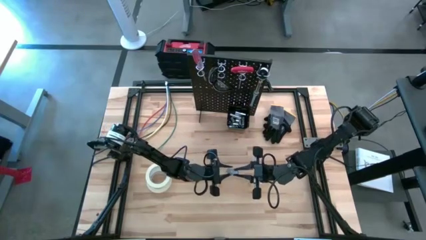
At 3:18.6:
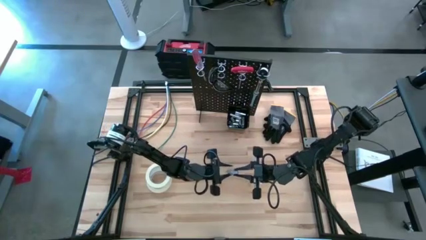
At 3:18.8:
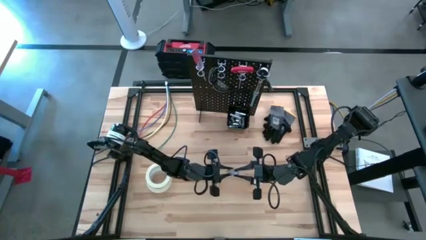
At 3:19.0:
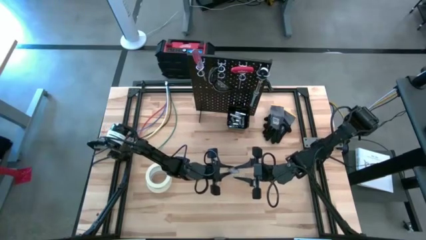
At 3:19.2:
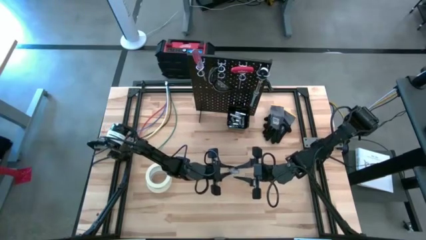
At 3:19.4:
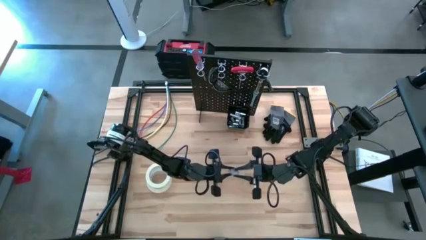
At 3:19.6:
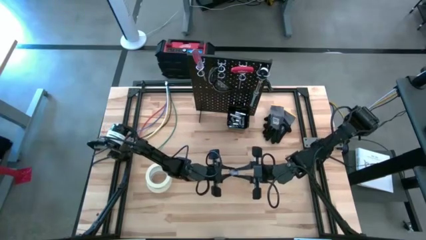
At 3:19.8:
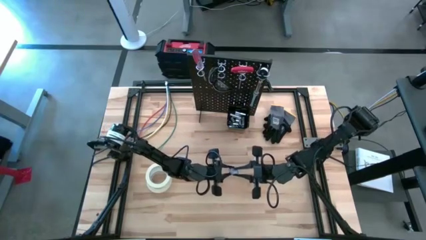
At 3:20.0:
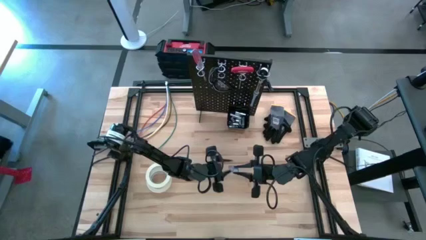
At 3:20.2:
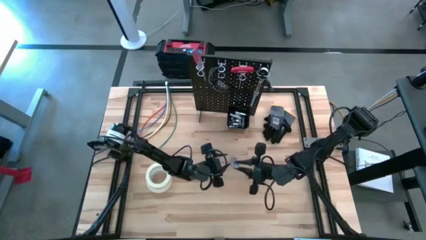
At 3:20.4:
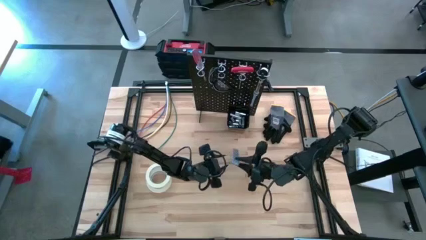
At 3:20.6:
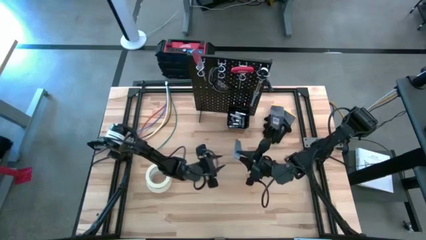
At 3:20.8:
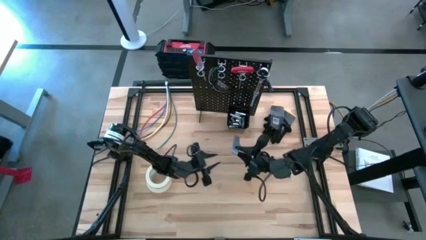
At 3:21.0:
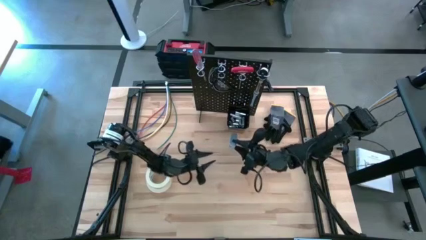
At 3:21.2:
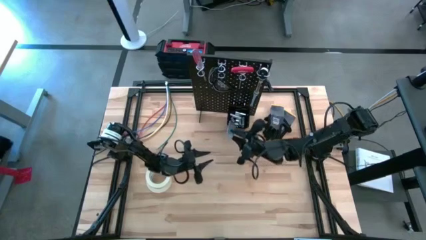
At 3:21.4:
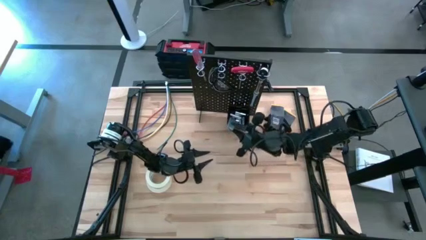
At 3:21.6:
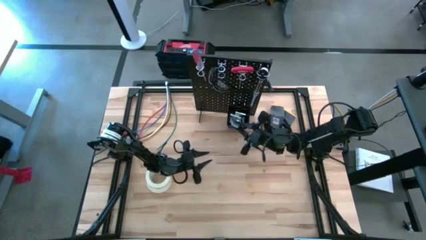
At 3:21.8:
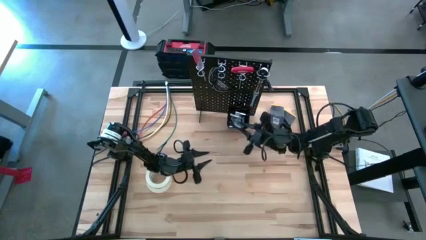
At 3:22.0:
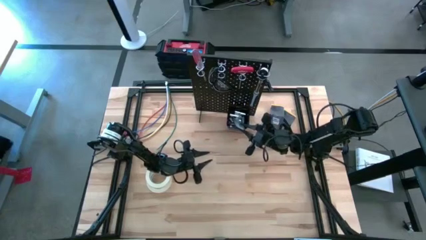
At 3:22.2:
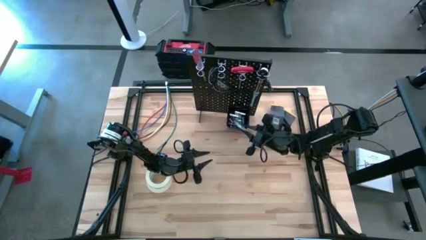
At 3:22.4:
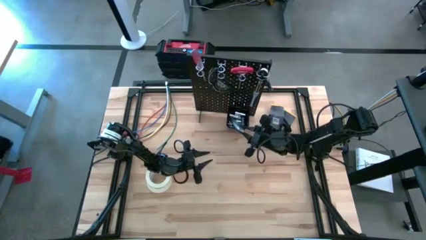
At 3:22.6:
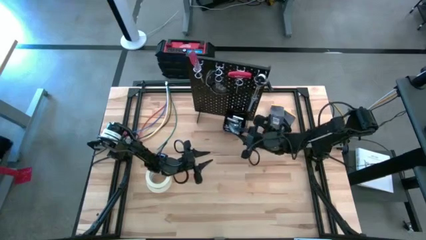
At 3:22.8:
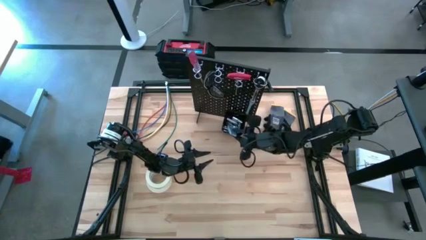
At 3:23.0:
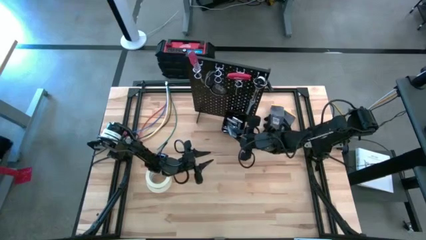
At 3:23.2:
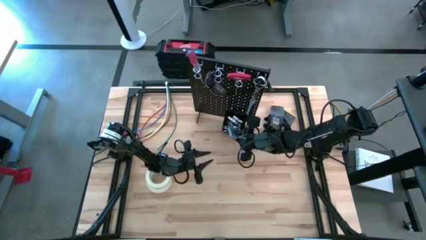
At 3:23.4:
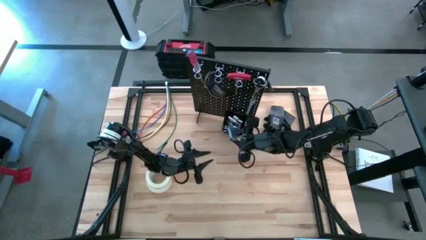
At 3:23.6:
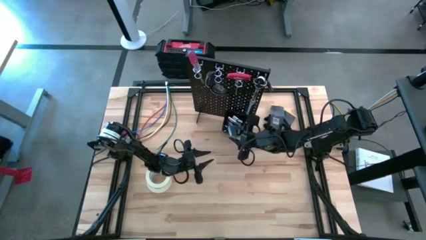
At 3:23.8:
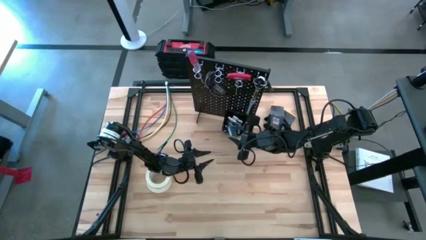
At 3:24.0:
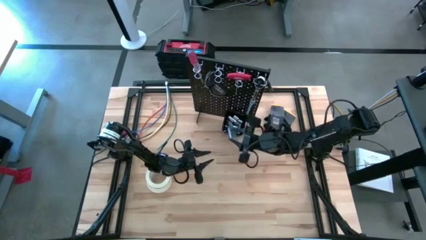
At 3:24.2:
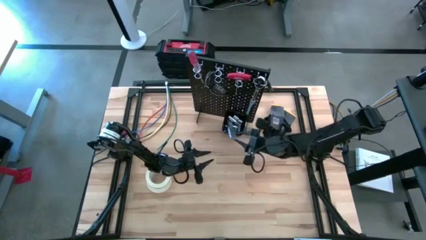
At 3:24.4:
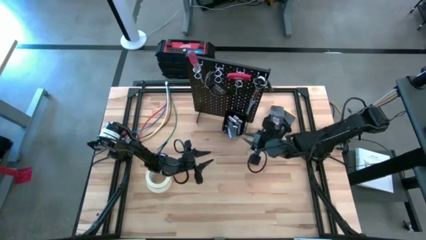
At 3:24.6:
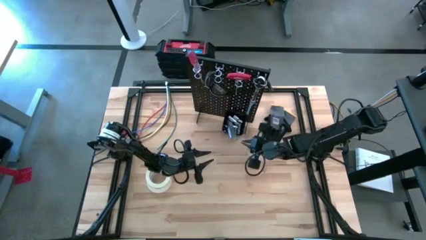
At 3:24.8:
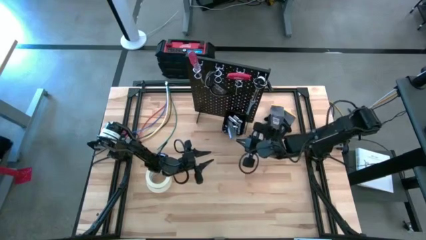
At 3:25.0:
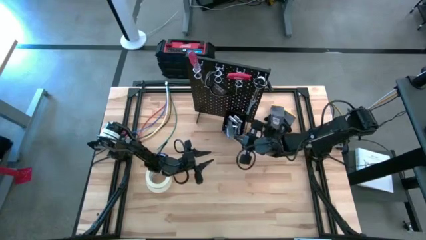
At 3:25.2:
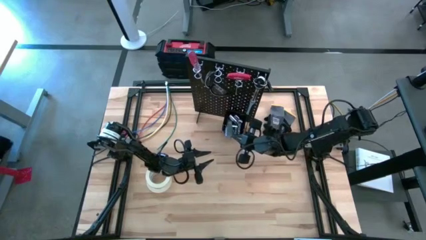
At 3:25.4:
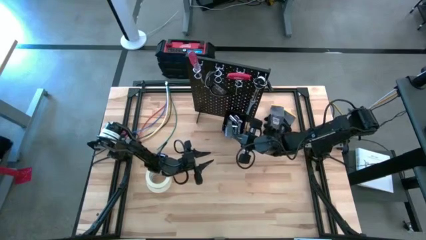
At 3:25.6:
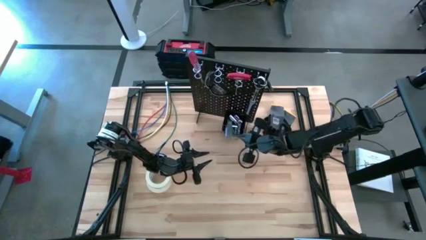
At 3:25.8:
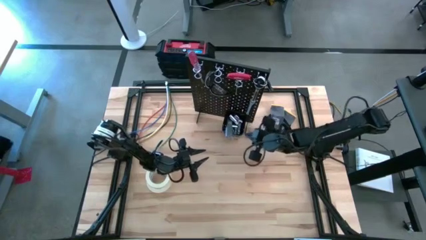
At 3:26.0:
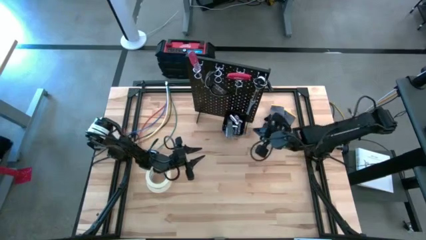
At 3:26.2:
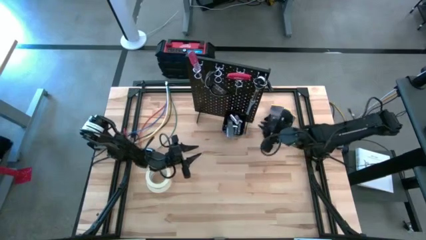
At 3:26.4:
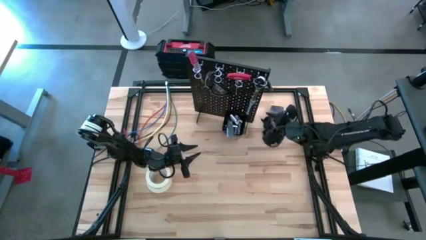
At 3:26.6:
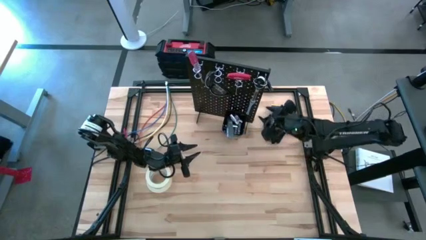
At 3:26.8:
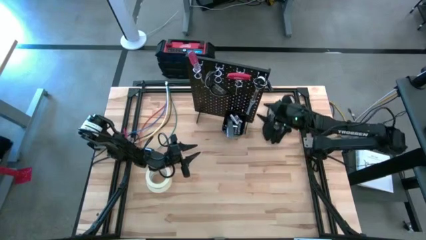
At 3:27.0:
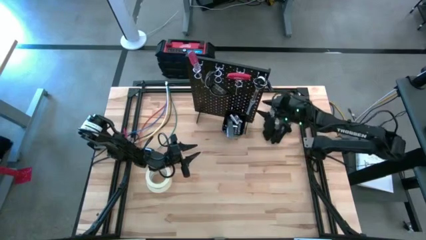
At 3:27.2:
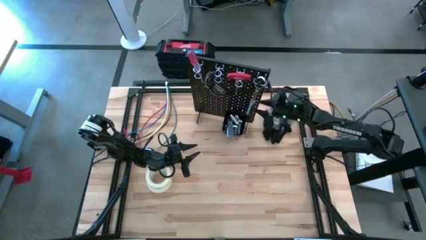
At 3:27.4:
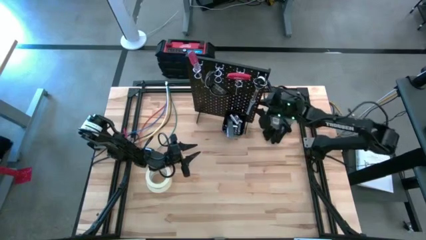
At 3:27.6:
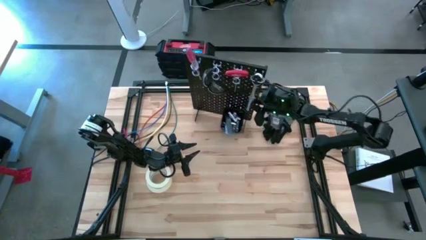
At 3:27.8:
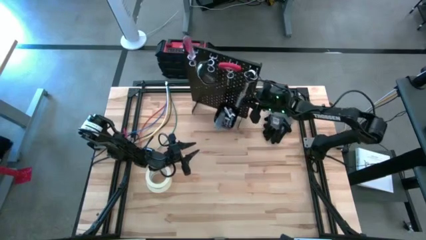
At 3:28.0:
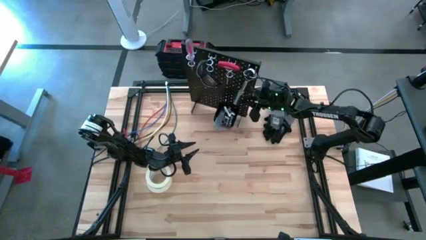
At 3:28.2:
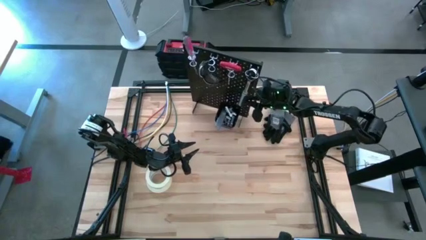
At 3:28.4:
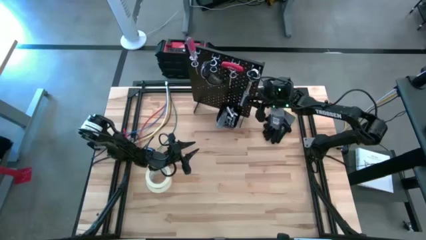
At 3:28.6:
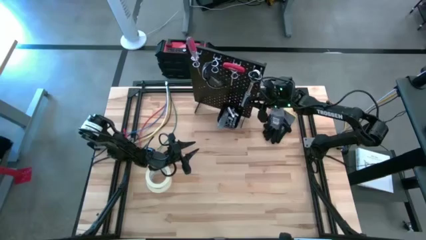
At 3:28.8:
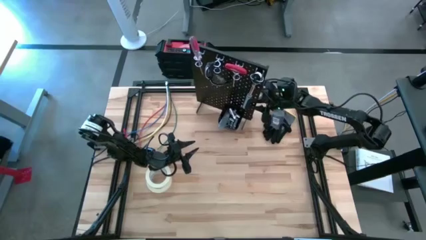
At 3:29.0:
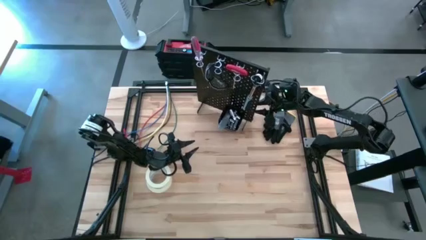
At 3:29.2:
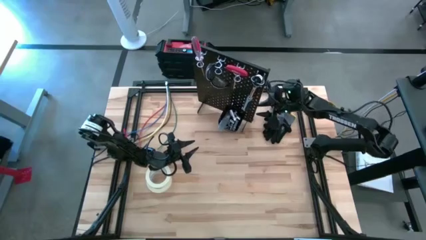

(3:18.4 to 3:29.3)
Task: Hang tools onto peg board
Put the cutter into the black bin on the peg board

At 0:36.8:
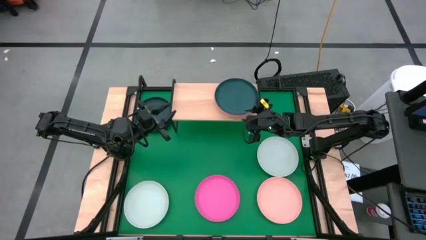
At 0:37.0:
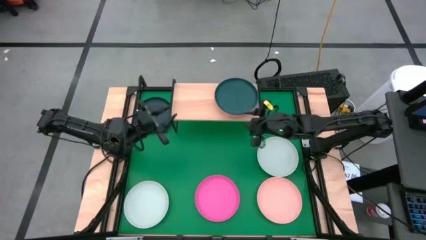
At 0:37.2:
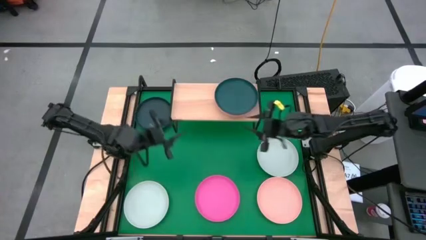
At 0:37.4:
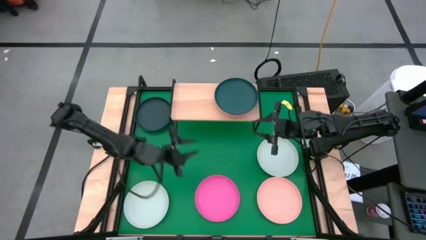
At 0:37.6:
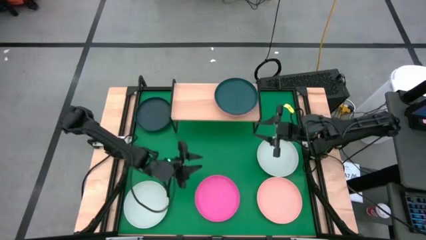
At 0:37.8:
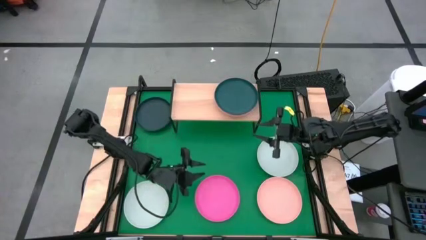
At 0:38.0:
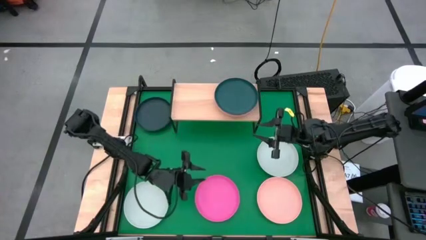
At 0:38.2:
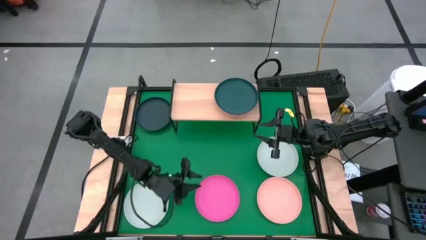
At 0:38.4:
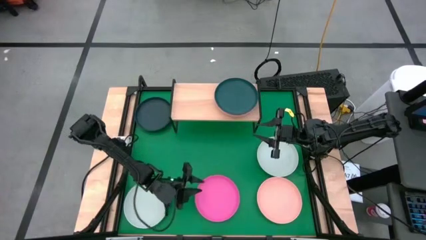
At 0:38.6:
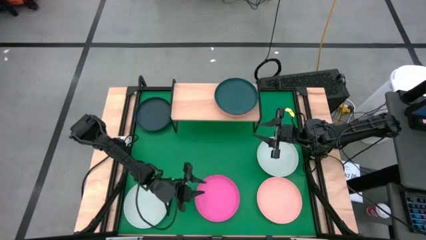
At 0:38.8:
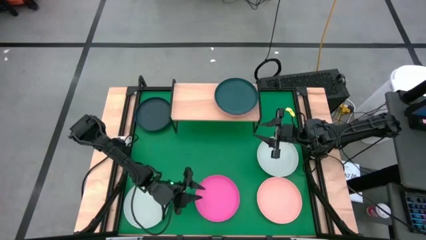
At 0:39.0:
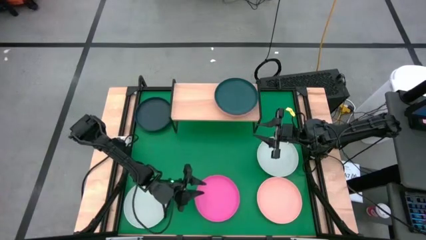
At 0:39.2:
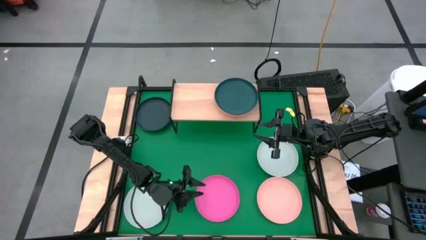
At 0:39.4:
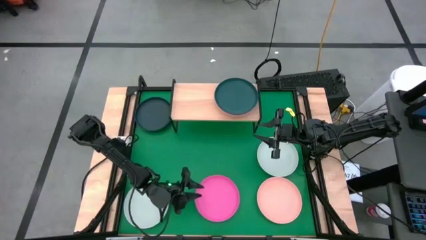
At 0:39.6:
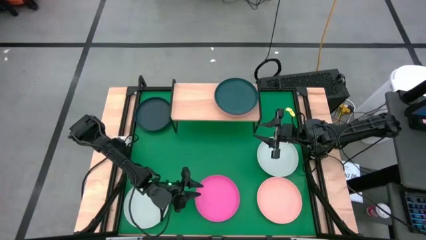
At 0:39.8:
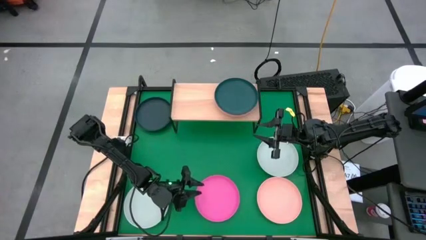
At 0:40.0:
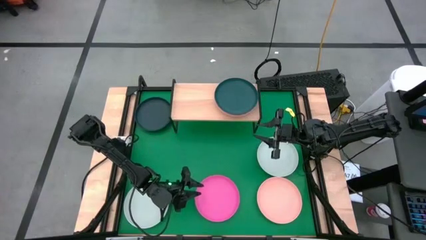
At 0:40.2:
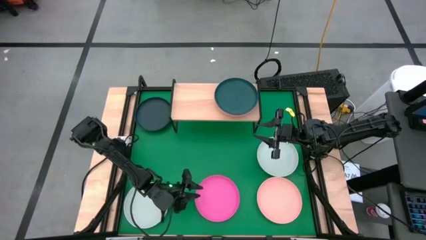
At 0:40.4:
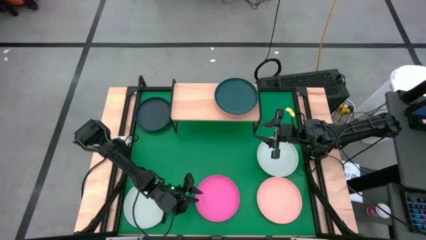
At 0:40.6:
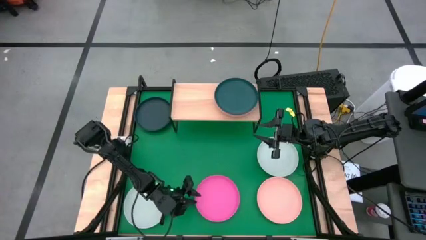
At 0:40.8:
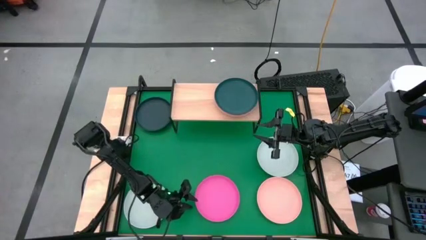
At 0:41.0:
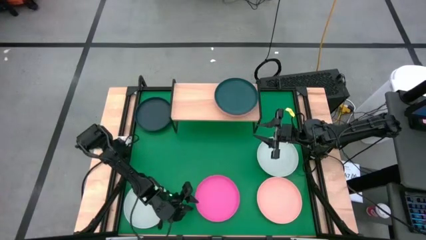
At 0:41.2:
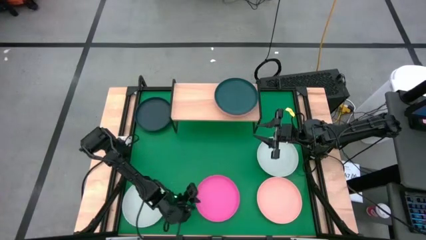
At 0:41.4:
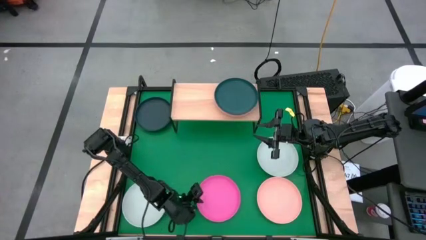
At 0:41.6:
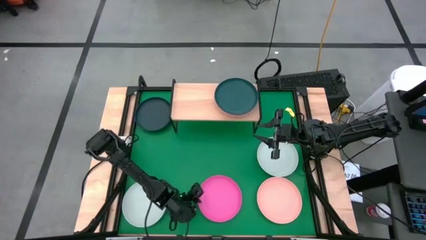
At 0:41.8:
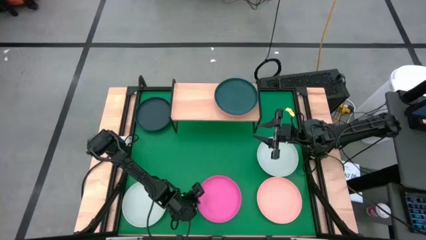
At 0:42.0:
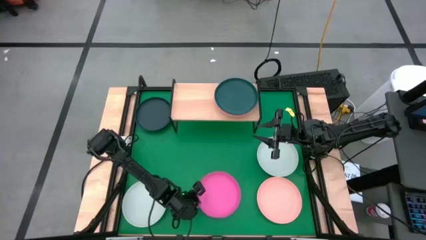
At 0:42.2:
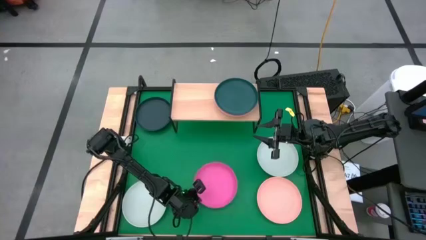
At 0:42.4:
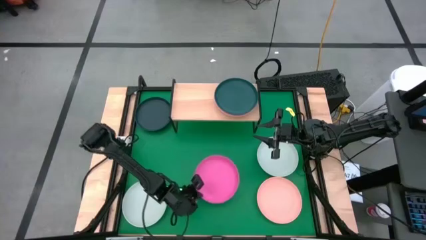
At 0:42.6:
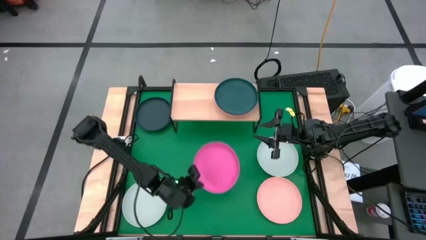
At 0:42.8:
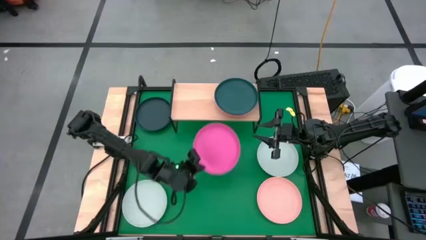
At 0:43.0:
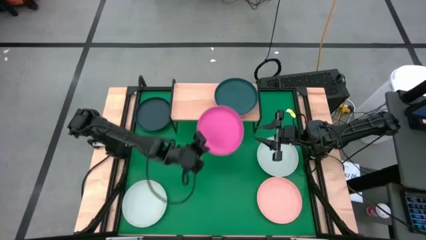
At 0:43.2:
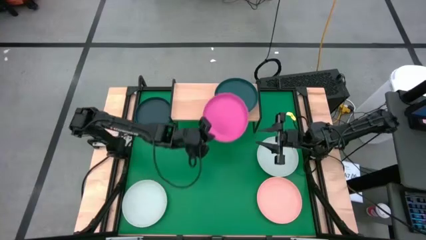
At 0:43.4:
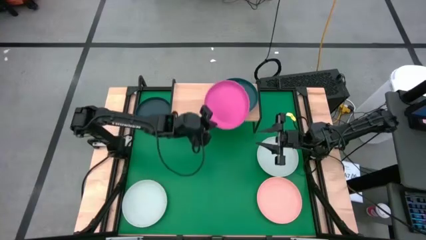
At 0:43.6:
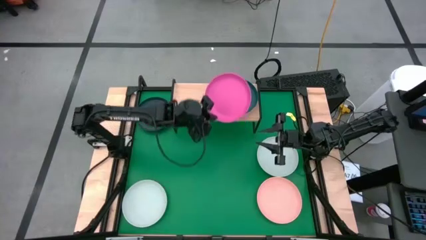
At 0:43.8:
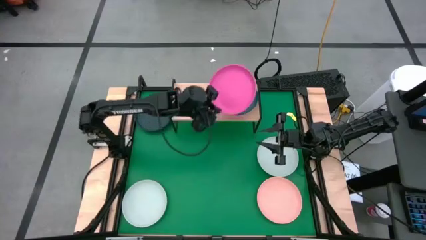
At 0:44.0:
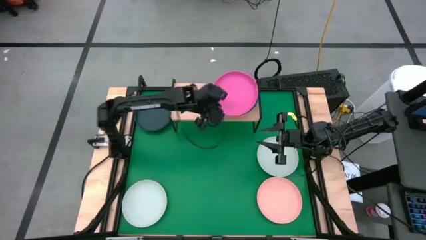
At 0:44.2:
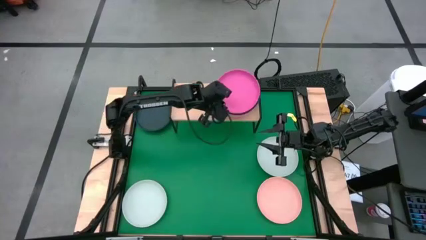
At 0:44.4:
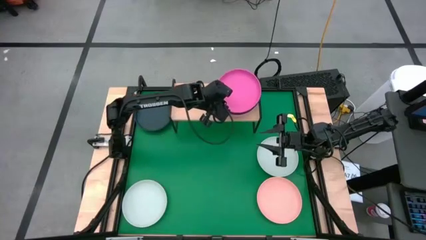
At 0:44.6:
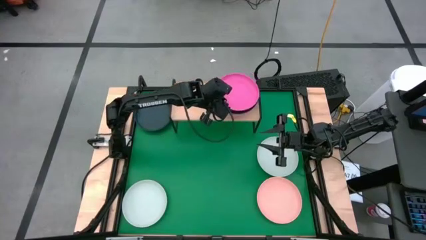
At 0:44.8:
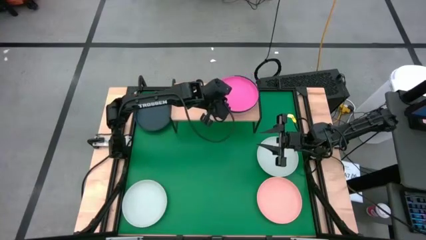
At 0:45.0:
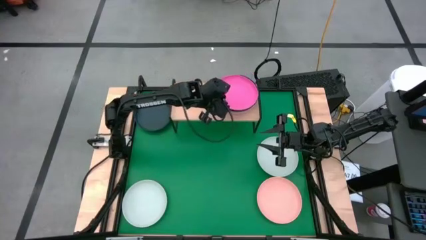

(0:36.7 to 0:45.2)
Task: Place and stack plates onto a shelf
Stack the pink plate on top of the dark blue plate on the shelf
